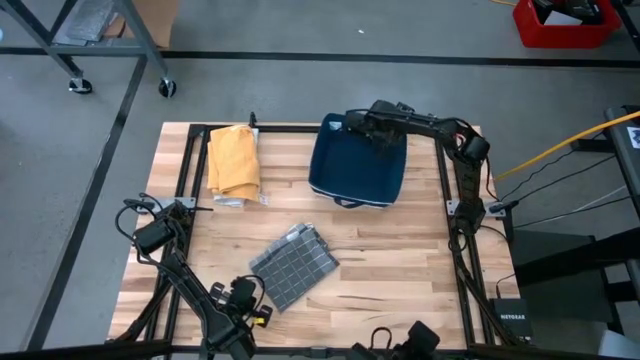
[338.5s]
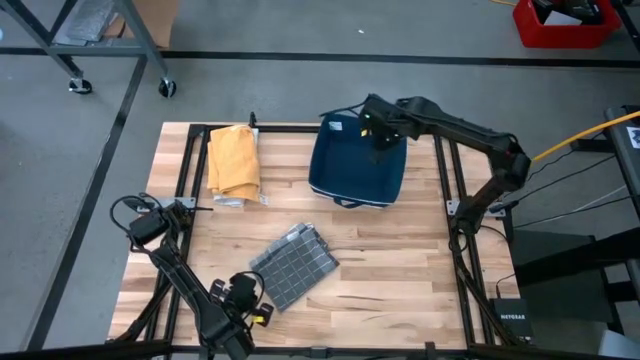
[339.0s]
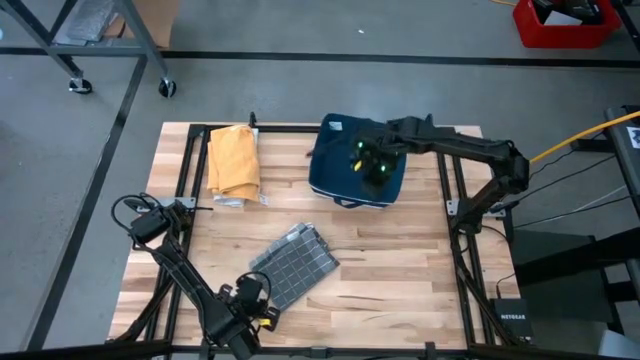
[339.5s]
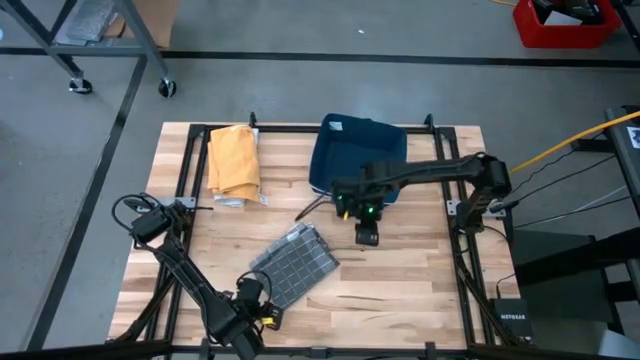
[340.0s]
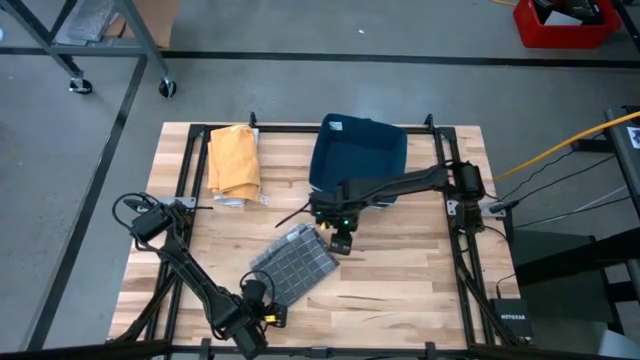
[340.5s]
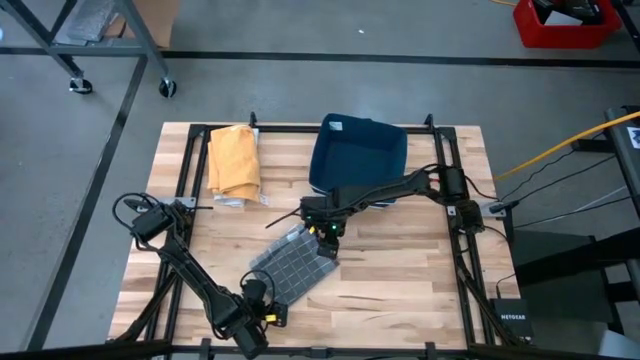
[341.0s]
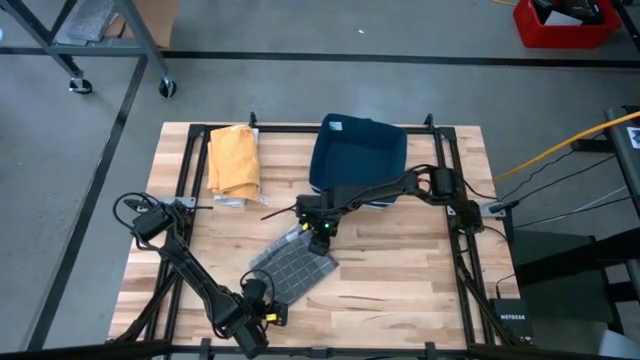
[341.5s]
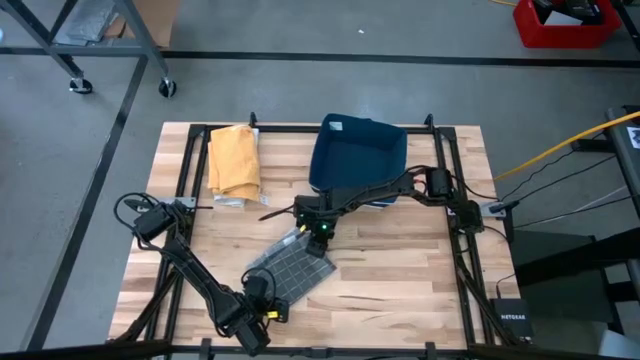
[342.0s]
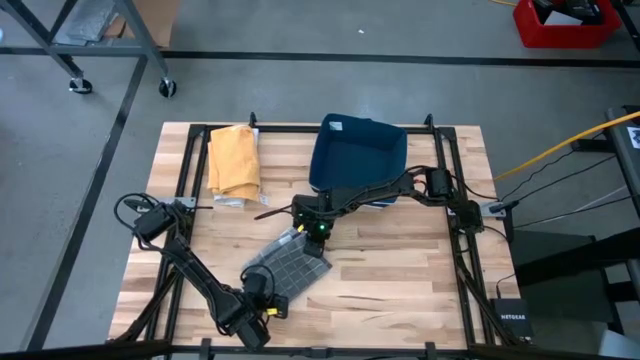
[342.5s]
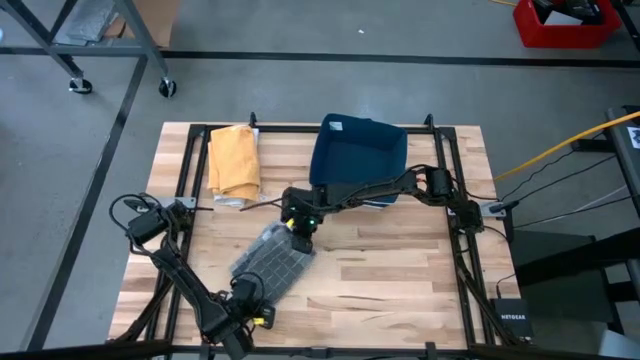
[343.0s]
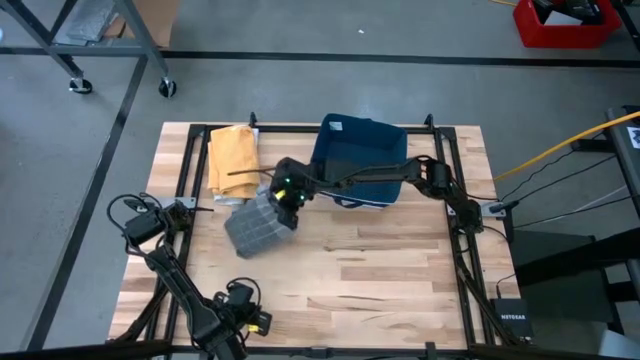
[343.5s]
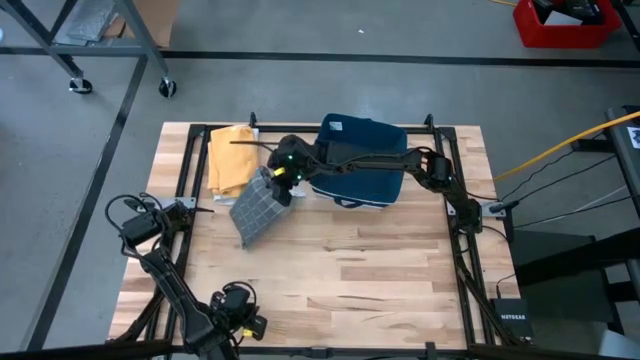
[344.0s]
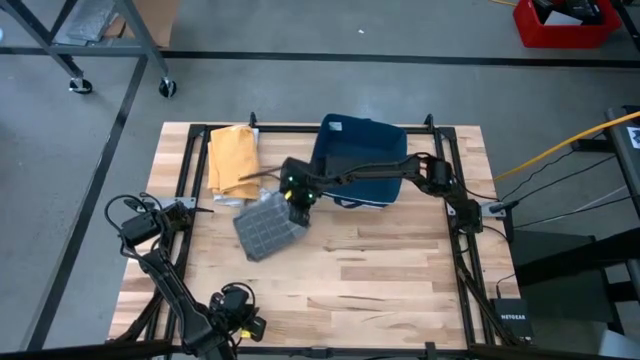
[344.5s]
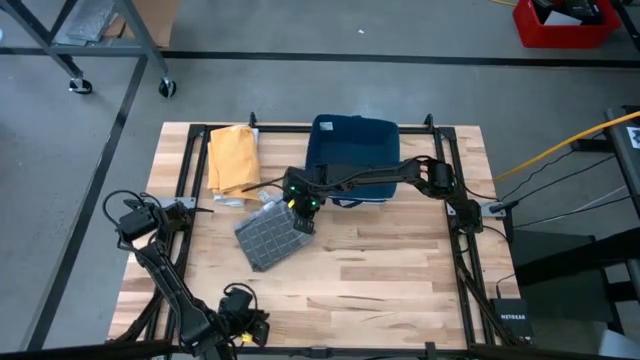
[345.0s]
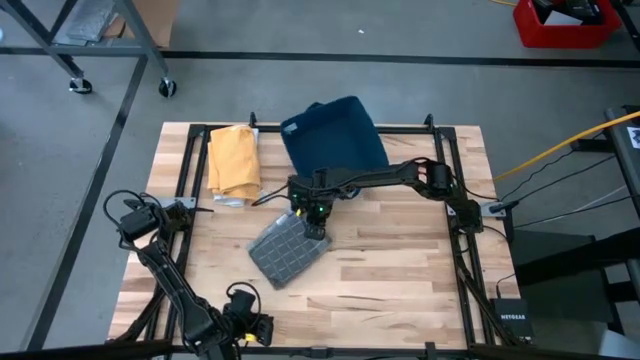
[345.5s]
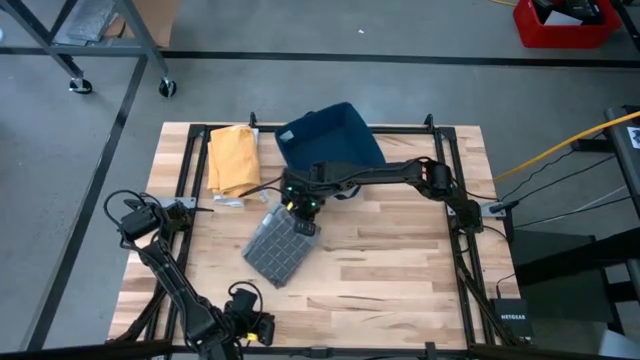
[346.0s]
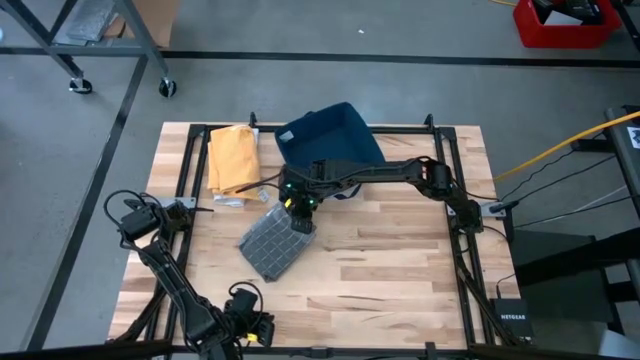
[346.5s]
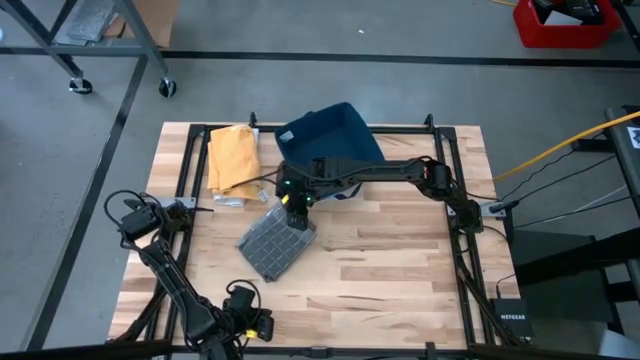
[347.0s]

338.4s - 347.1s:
Task: Fold towel
Stack the gray patterned towel on top of the yellow towel

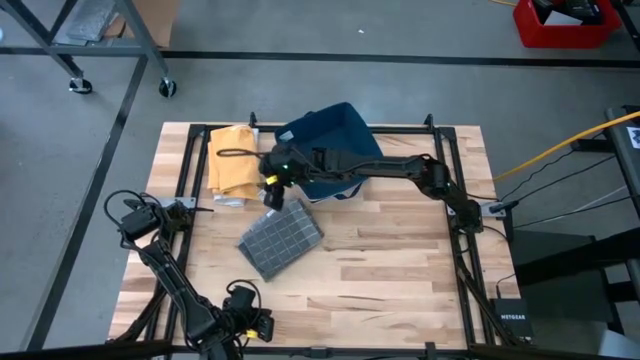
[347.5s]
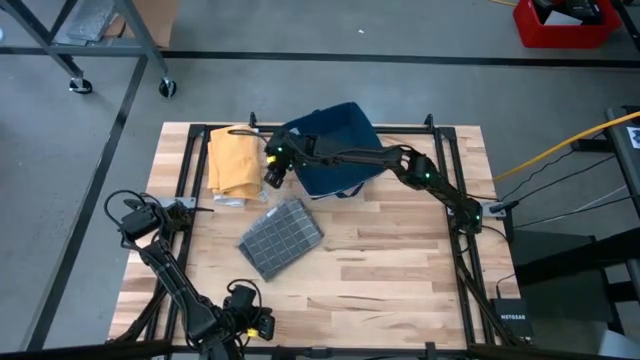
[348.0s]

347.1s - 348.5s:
Move the blue laundry bin to the top right

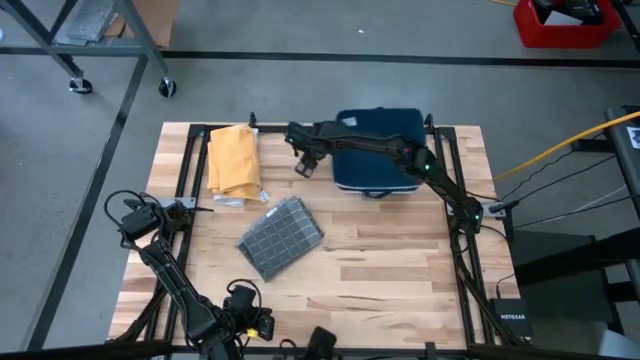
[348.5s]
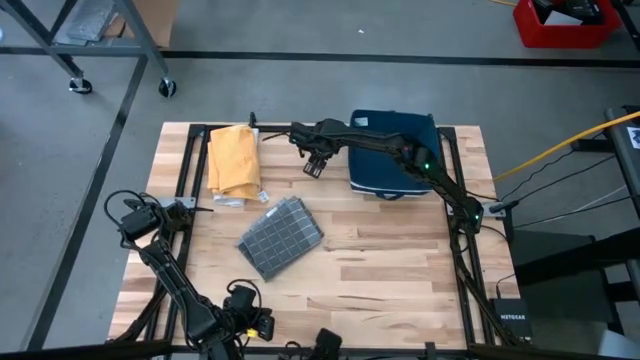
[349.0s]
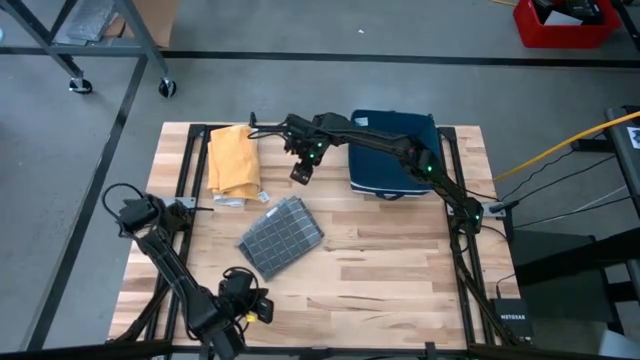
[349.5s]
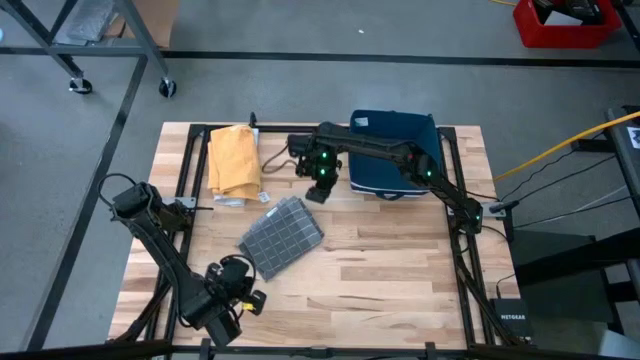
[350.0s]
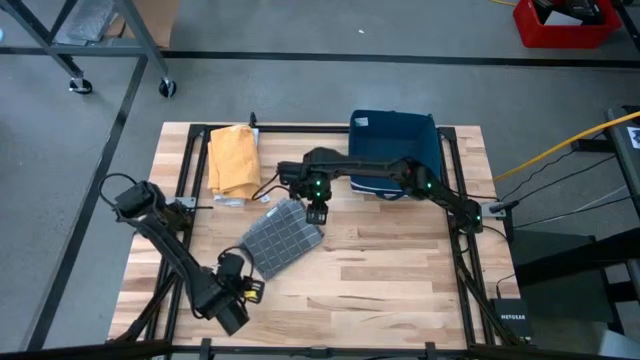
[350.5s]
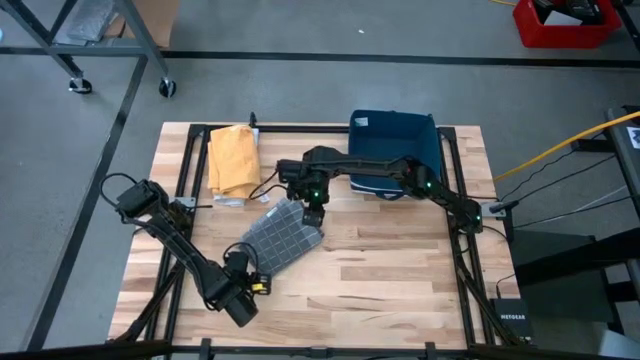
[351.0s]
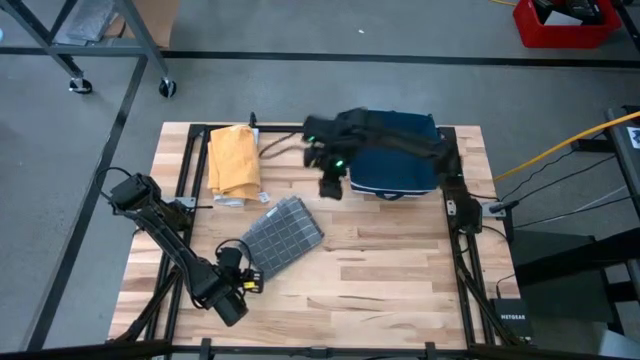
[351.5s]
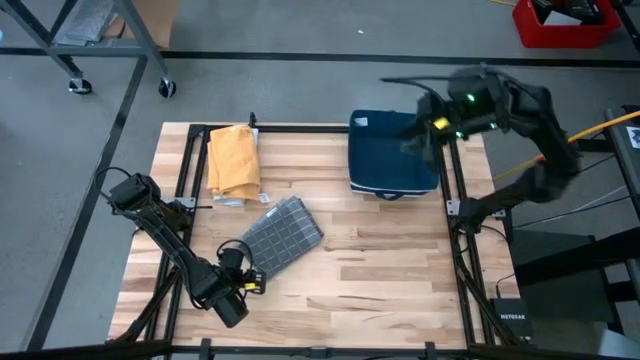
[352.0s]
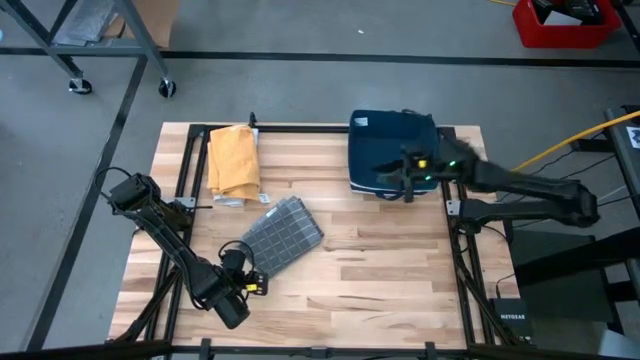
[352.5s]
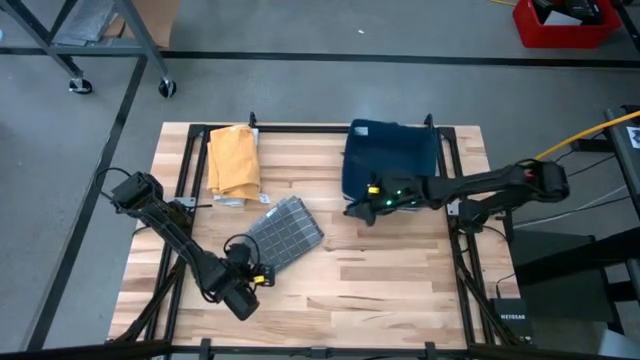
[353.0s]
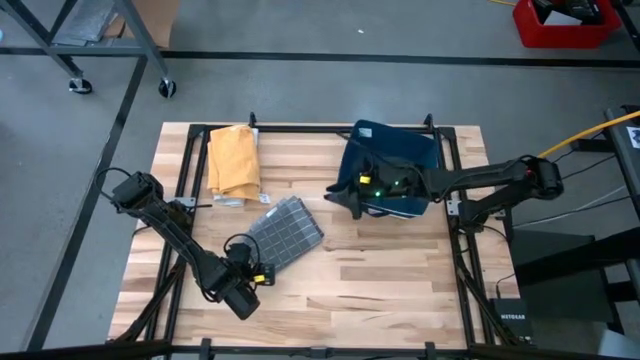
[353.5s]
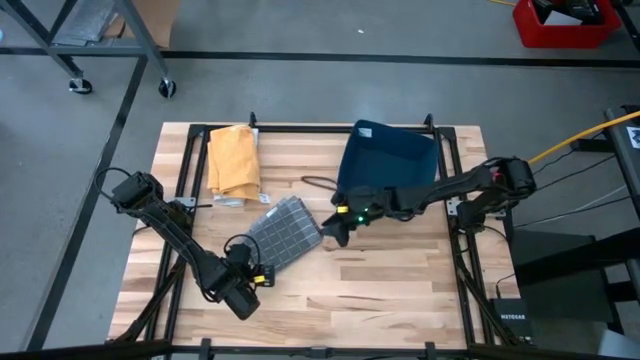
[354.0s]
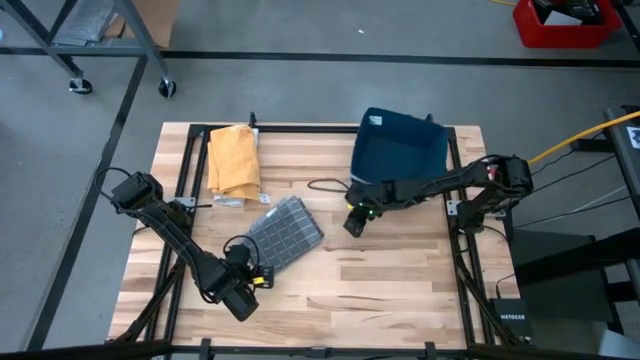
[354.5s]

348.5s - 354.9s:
Move the blue laundry bin to the right

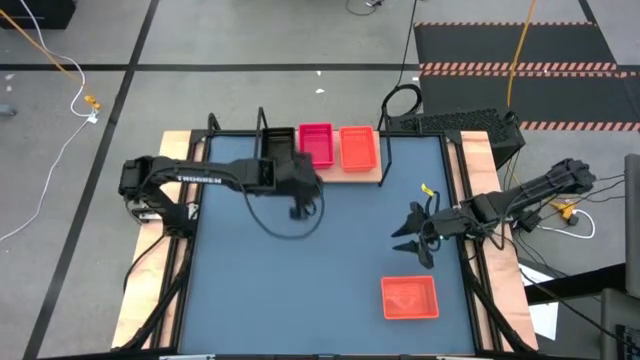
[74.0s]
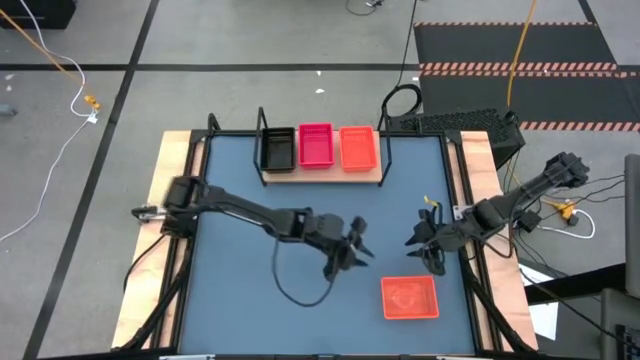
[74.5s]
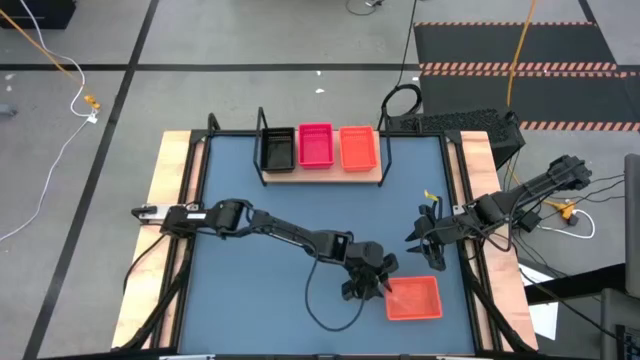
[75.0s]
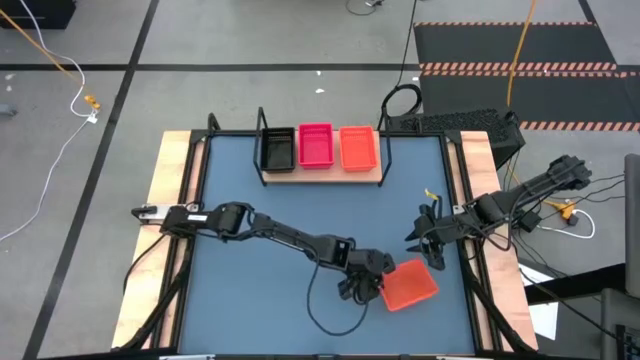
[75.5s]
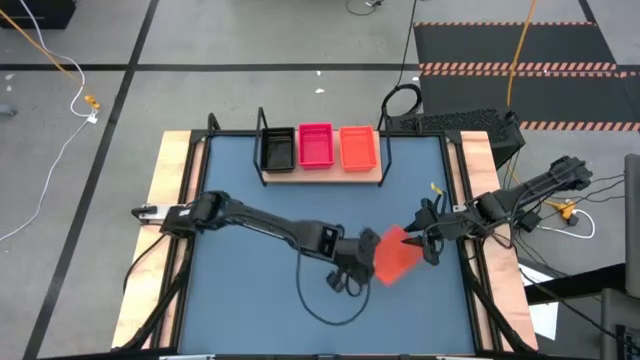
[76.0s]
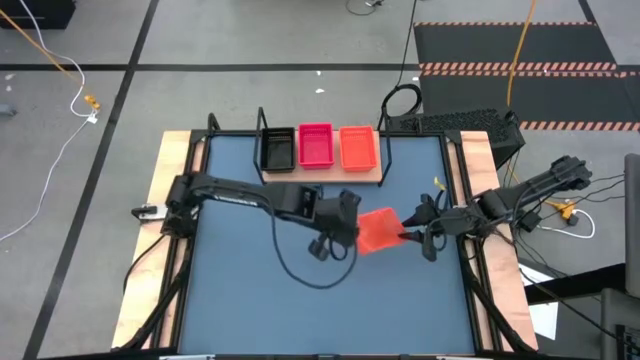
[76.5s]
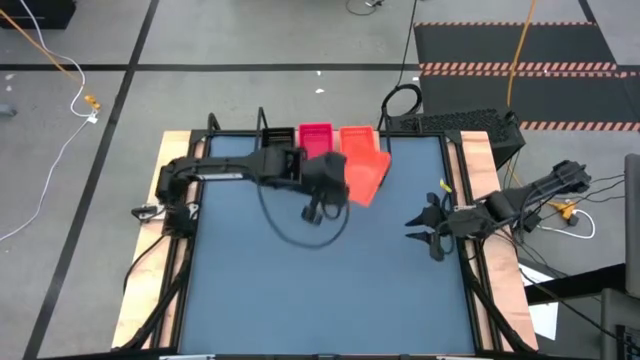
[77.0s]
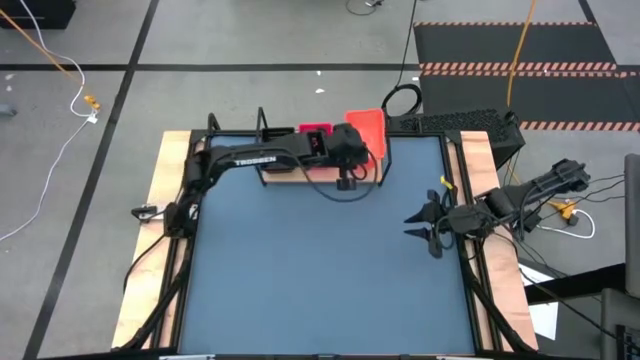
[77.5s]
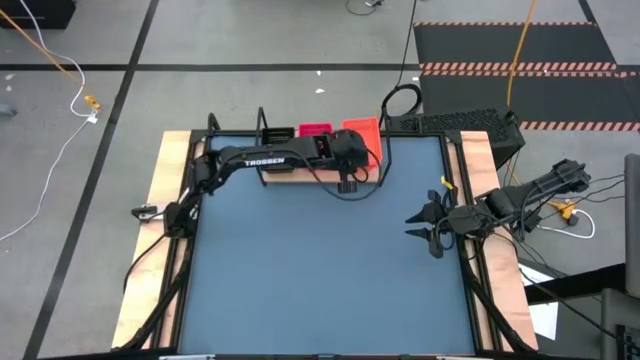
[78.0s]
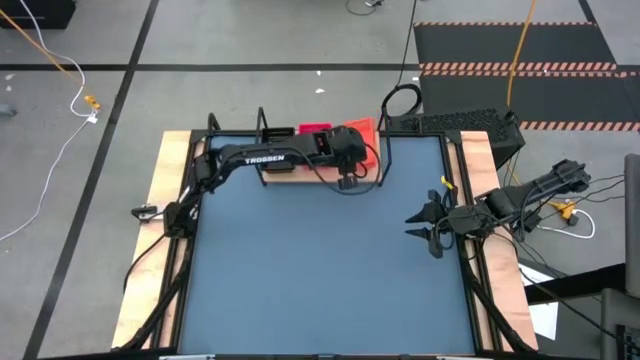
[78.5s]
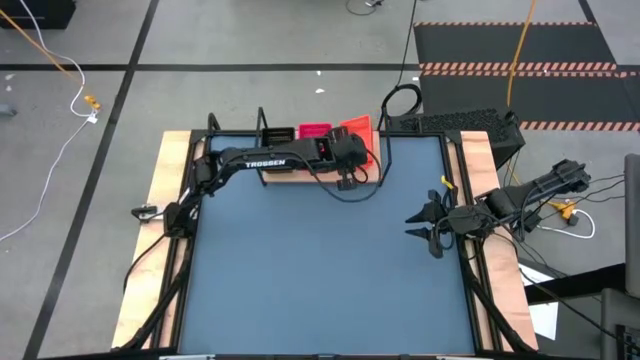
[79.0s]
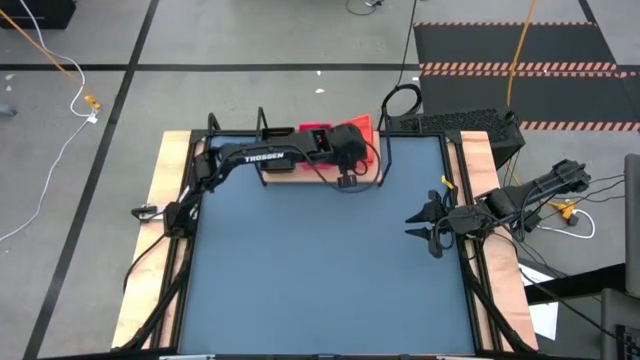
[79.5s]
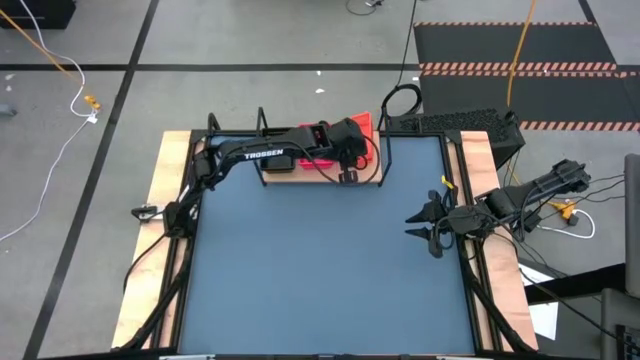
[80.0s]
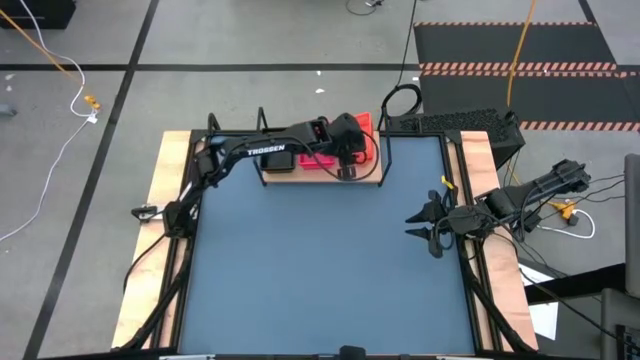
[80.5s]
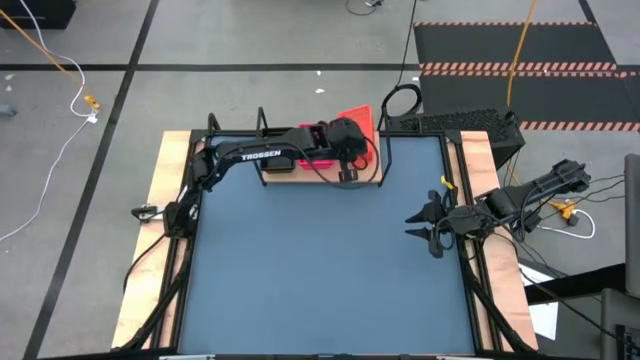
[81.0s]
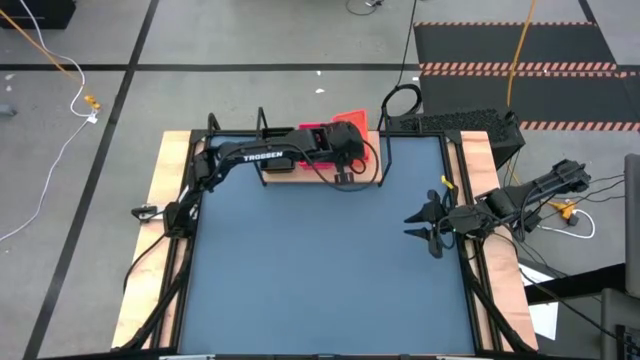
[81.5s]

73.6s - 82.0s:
Task: Stack baskets on shelf by color
Stack the orange bin on top of the stacked orange bins on the shelf
